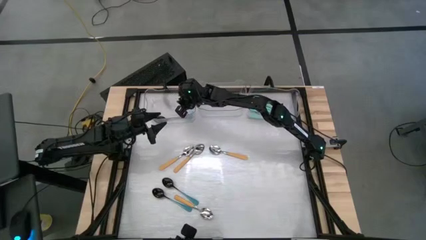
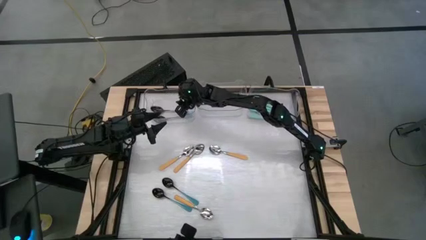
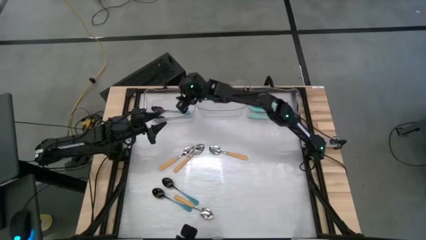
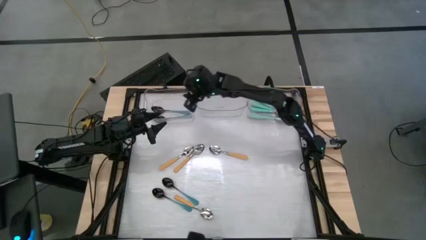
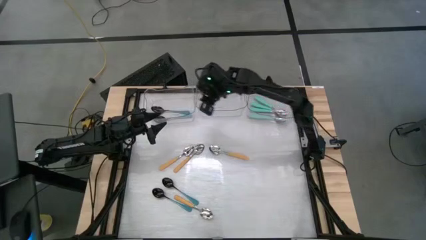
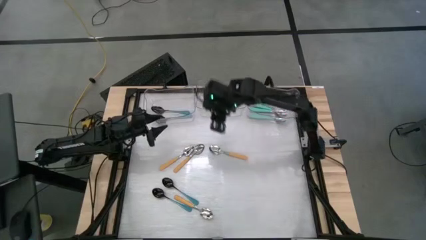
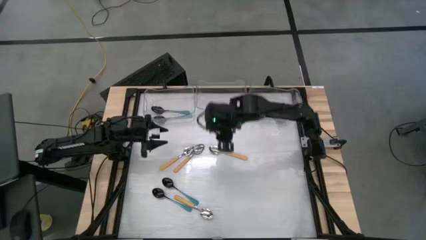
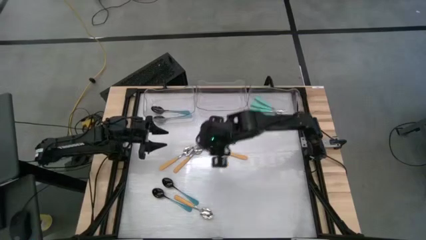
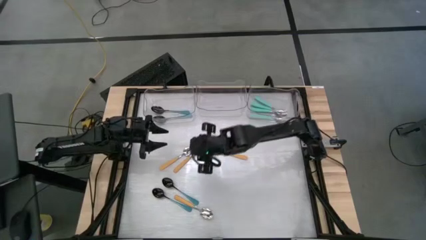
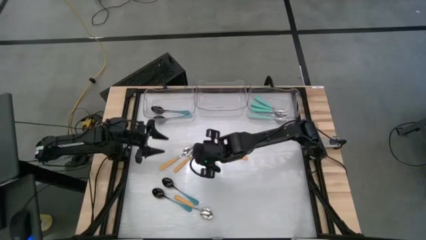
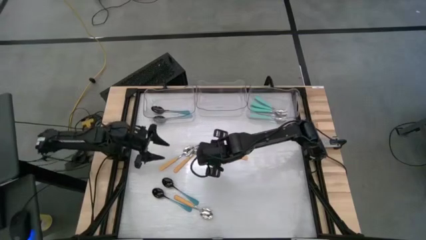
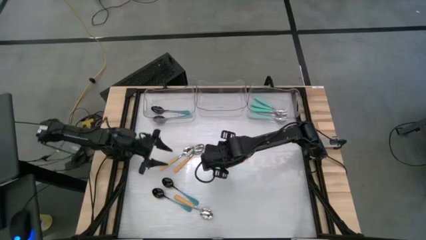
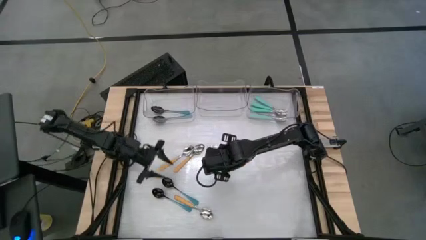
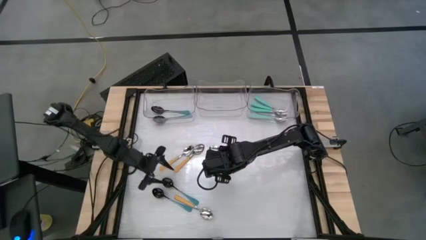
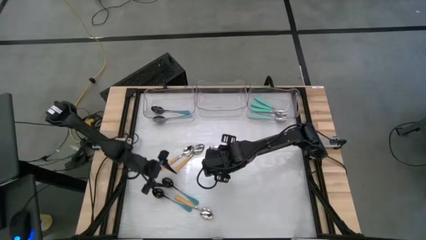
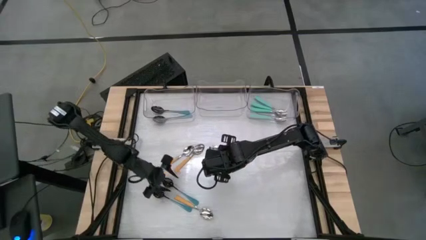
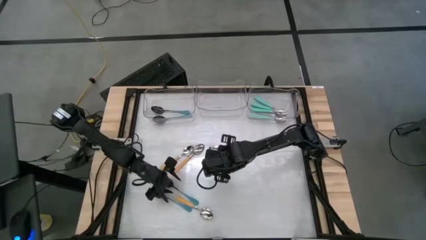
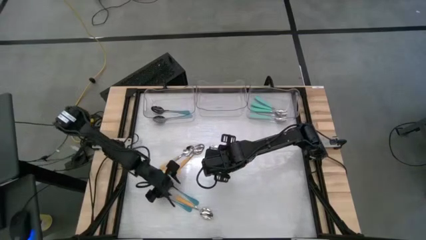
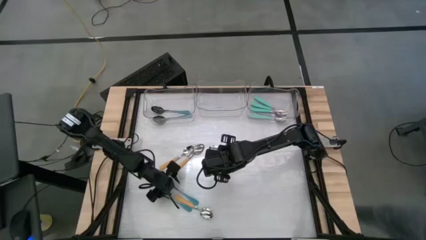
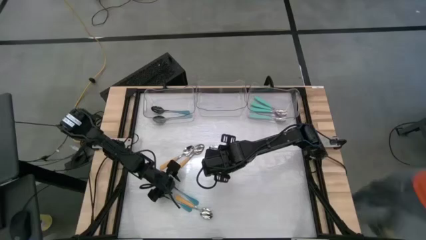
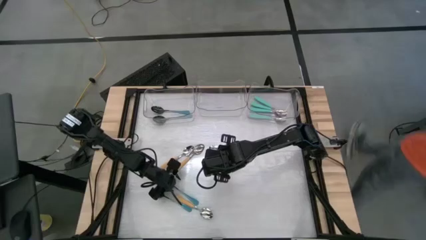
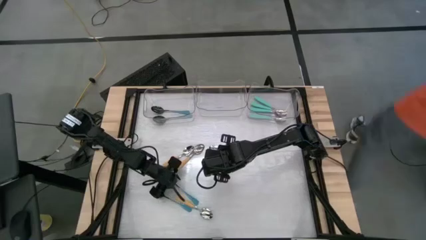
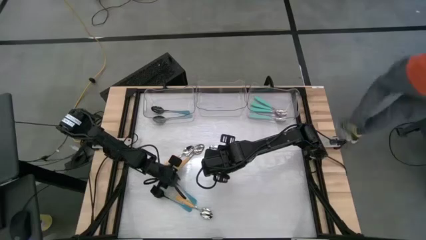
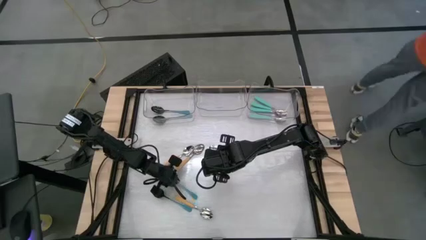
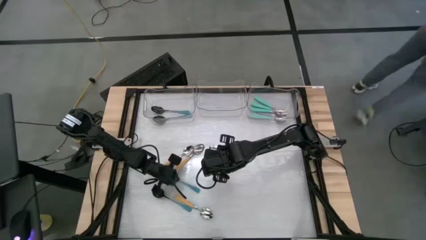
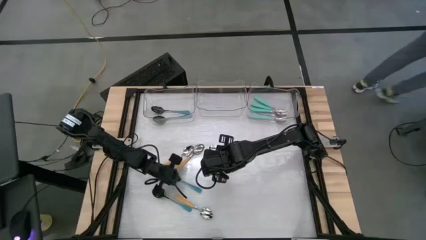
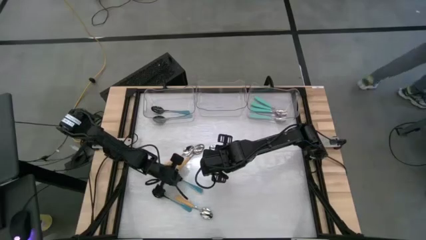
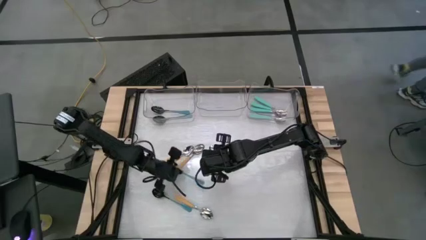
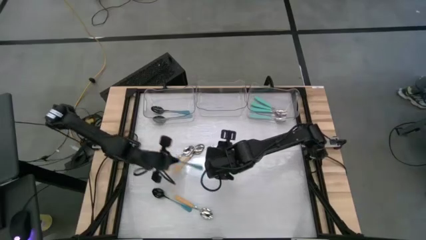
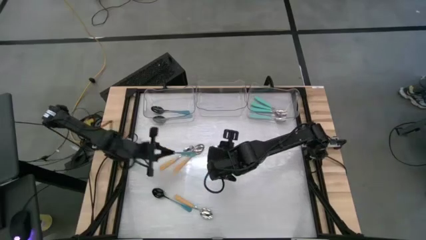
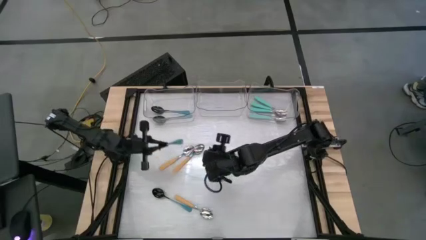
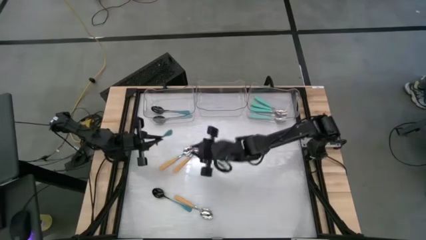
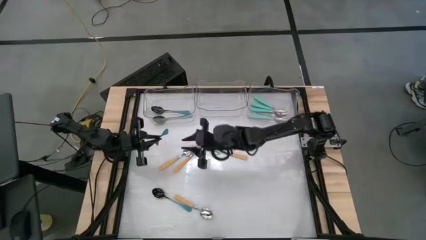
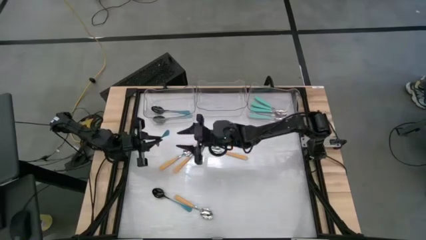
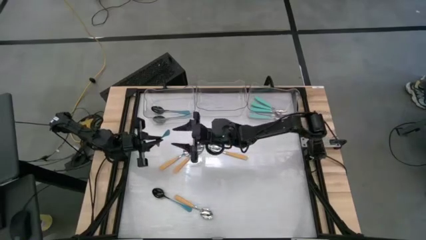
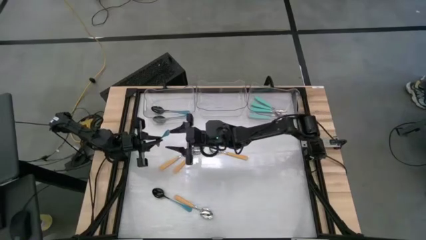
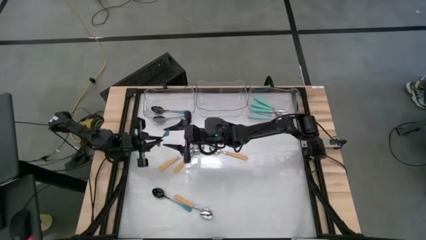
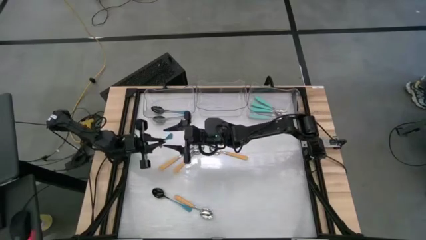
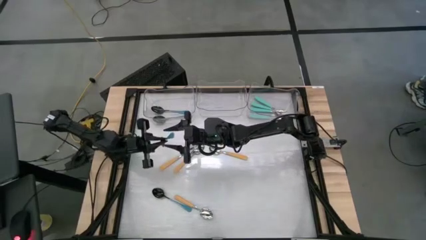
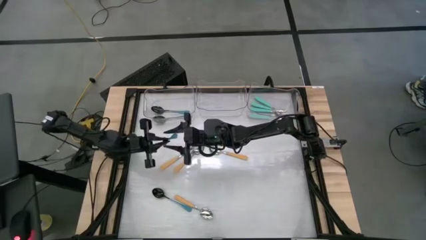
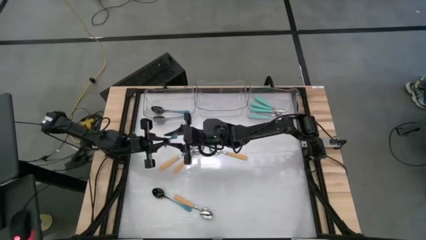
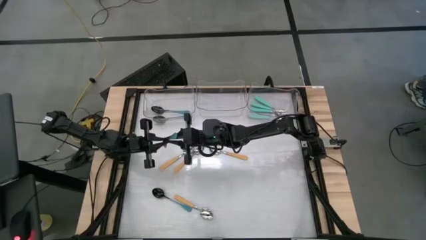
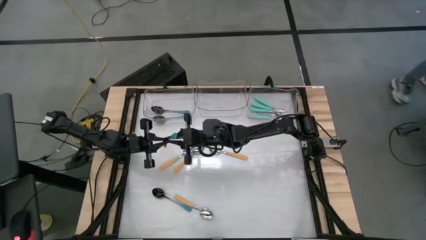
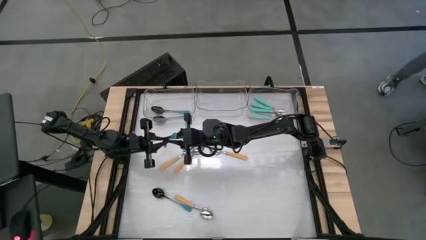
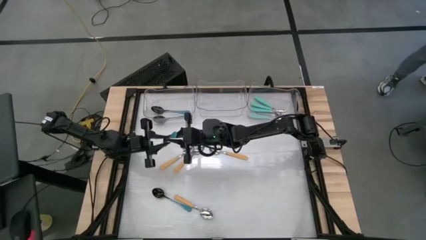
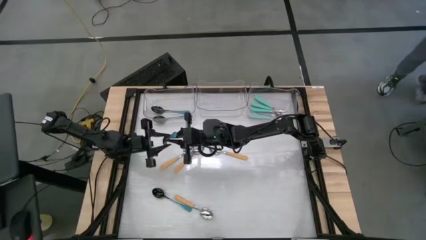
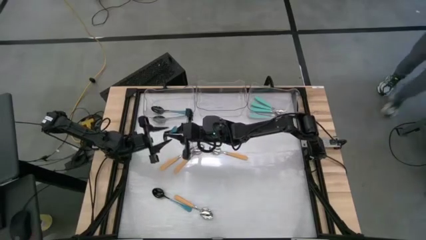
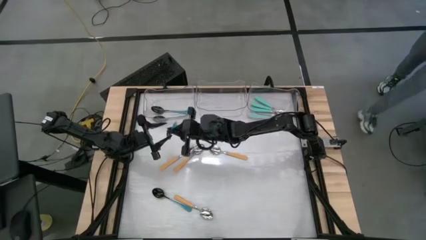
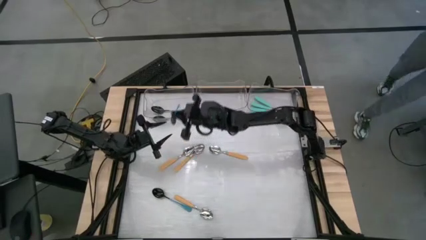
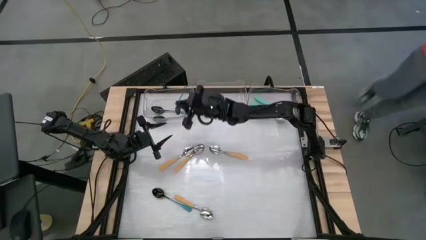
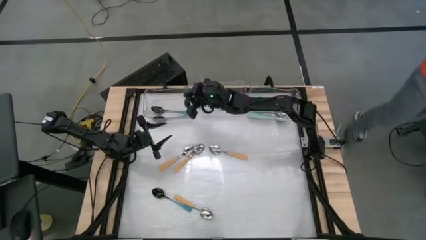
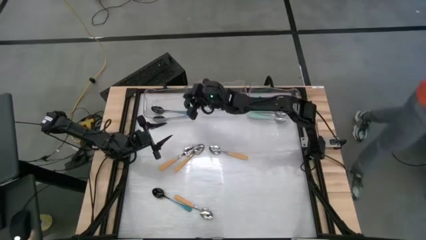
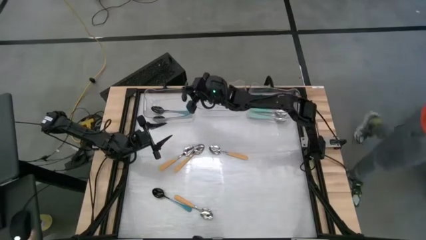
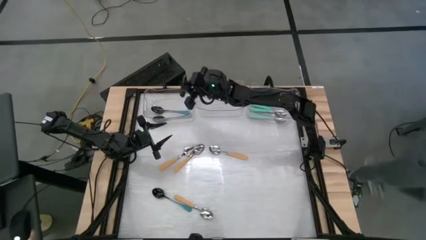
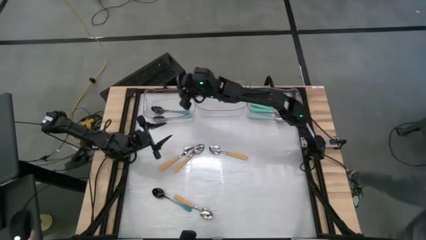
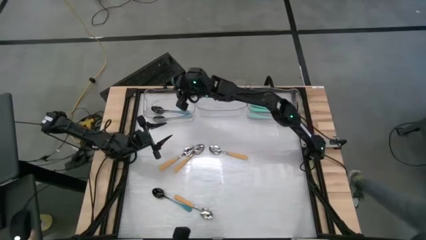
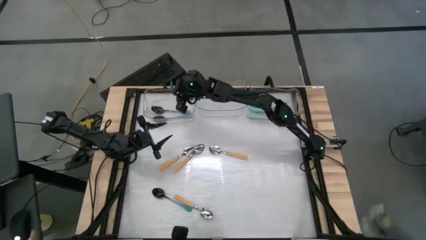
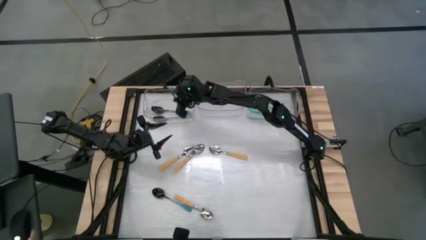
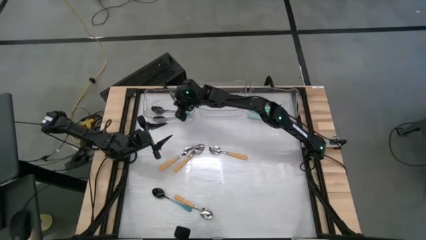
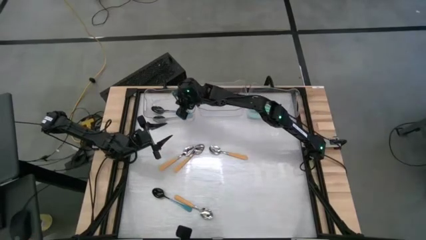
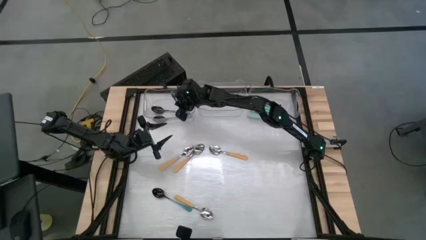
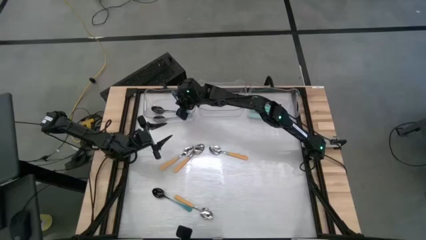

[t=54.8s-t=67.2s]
Task: Sort silverware by color (type)
Put the top blue spoon into the top left transparent bin

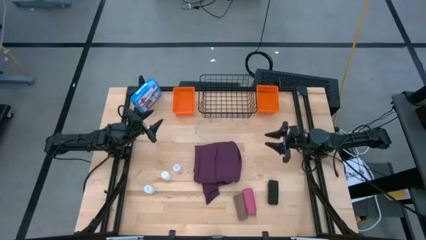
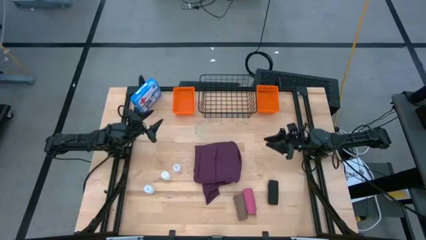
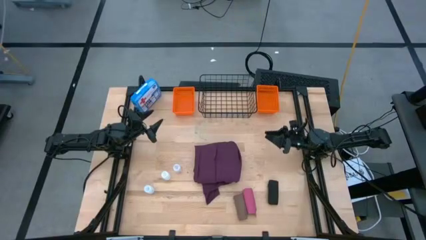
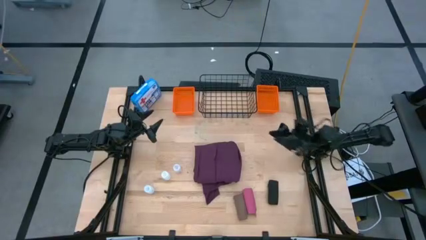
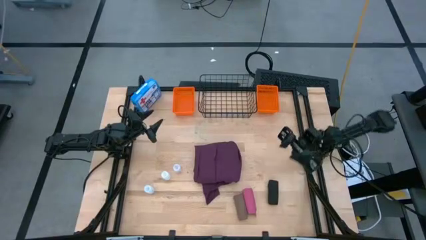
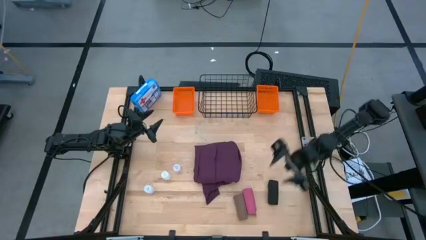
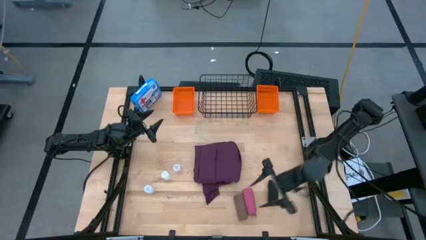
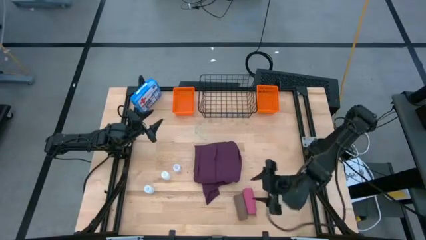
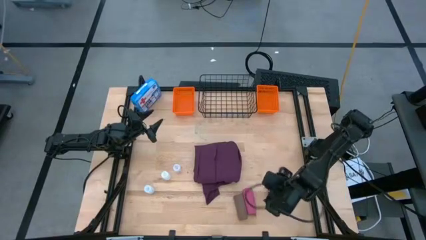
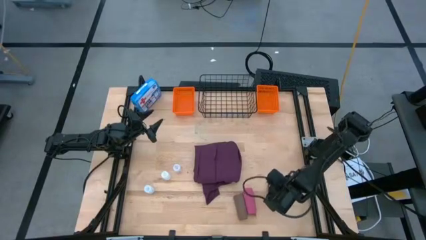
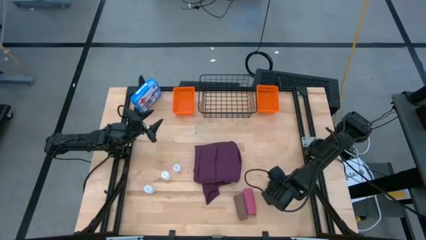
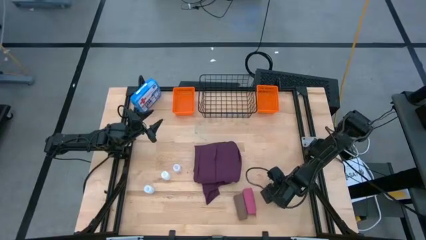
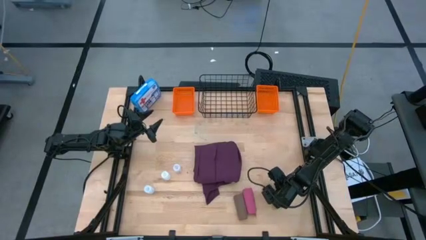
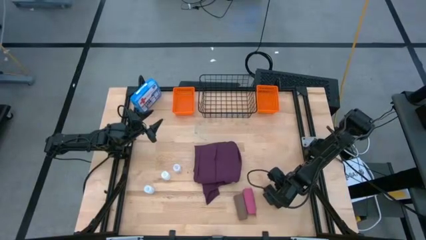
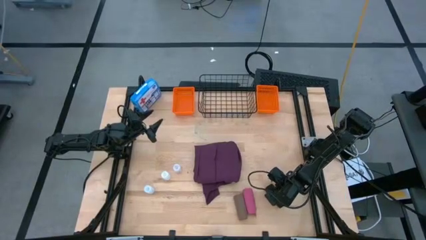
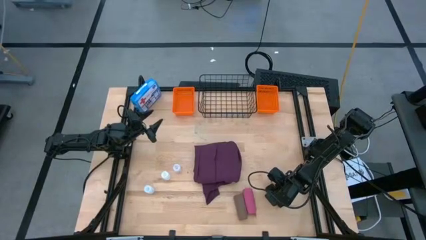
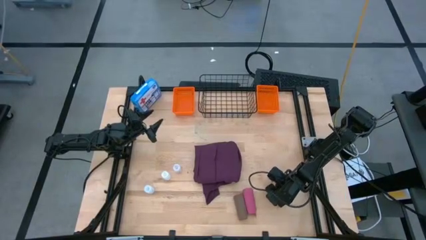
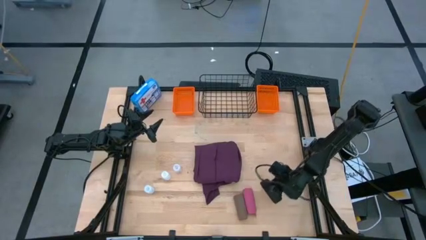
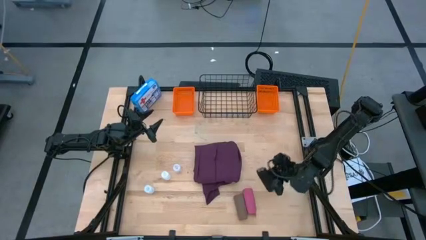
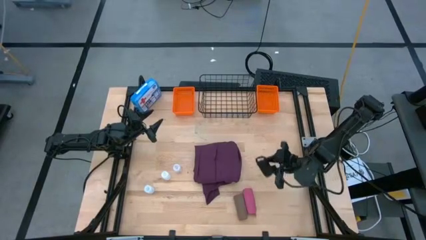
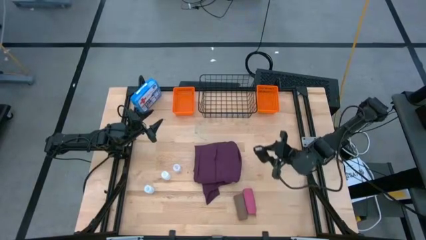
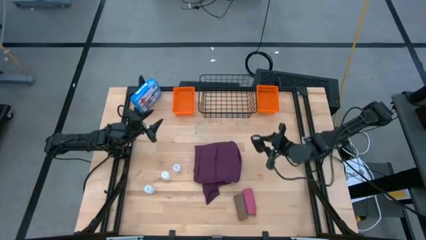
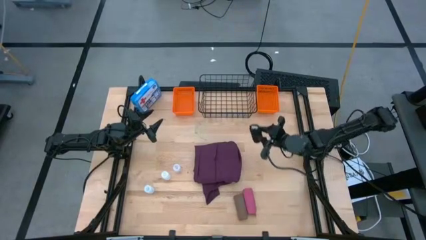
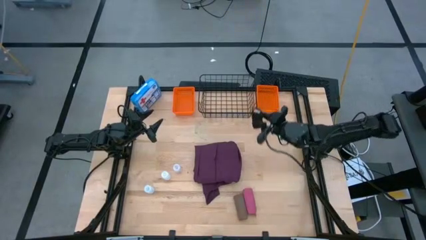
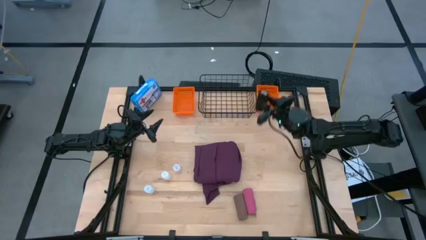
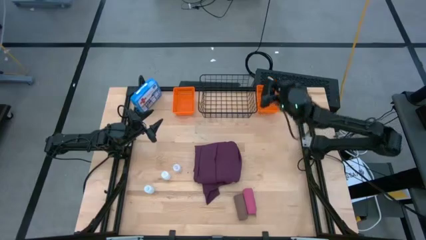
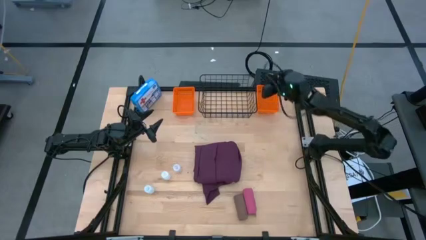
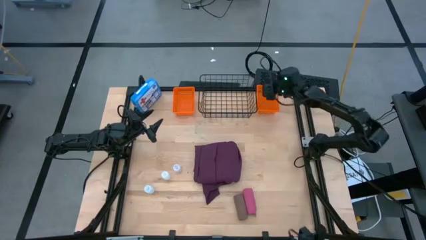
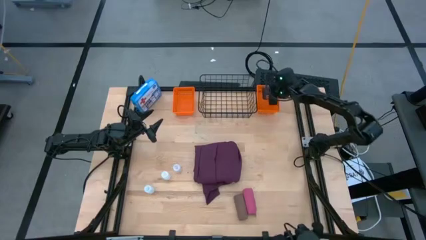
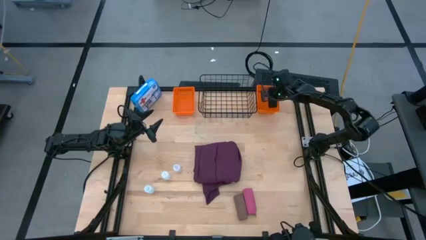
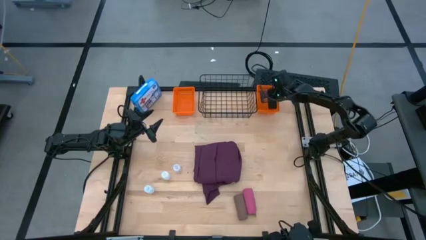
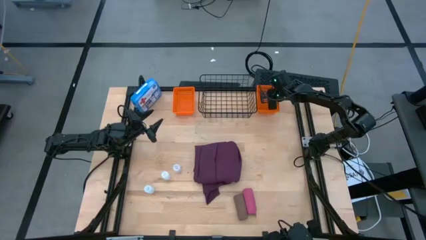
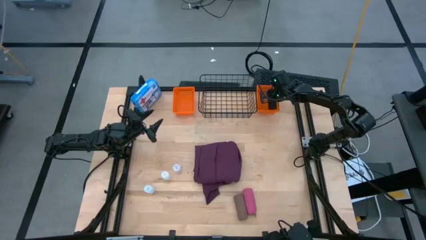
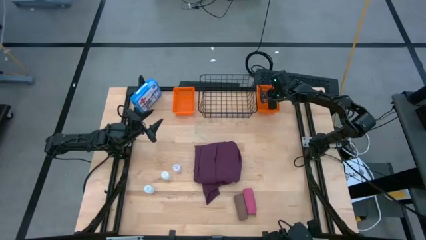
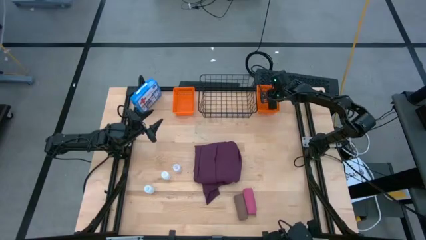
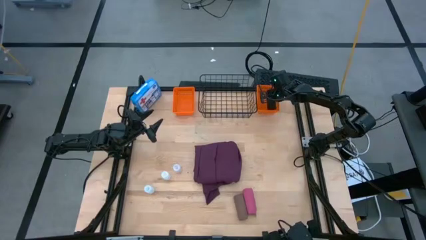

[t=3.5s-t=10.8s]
Task: Pick & place medical supplies in basket/bin
Put the black bandage into the right orange bin
